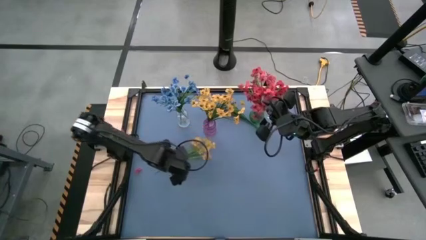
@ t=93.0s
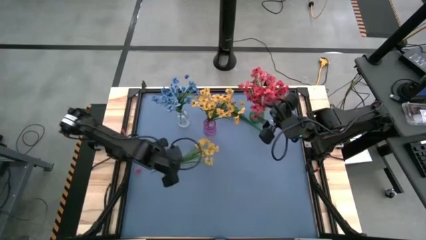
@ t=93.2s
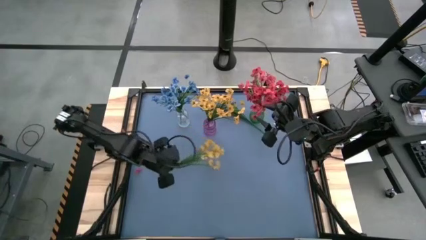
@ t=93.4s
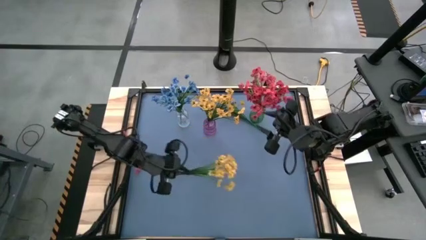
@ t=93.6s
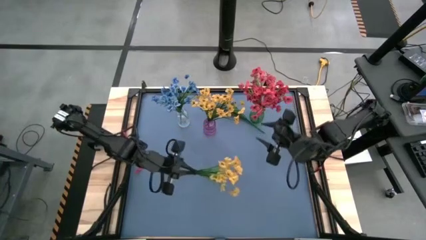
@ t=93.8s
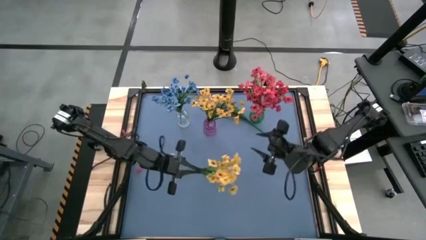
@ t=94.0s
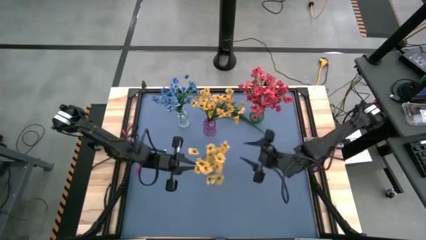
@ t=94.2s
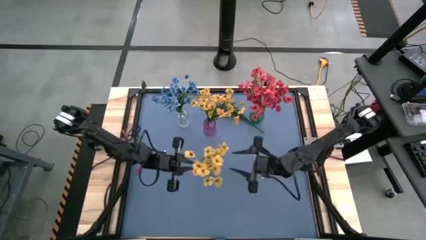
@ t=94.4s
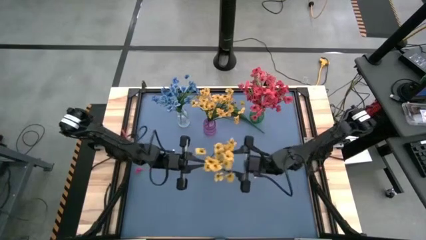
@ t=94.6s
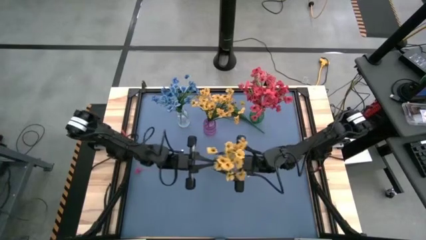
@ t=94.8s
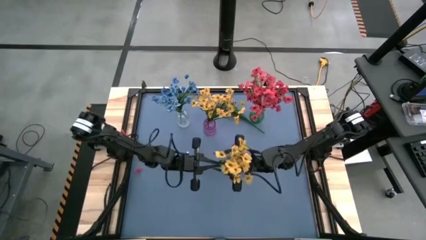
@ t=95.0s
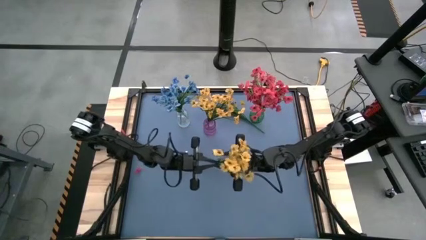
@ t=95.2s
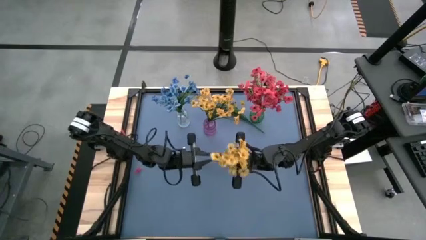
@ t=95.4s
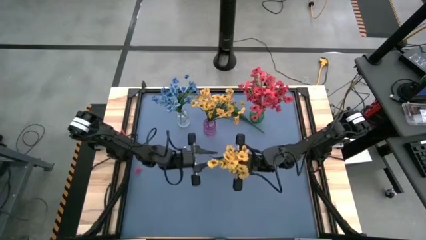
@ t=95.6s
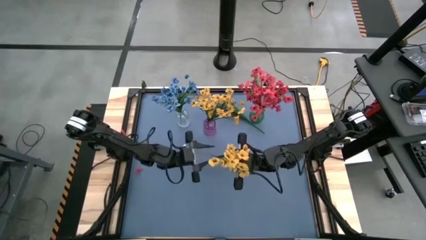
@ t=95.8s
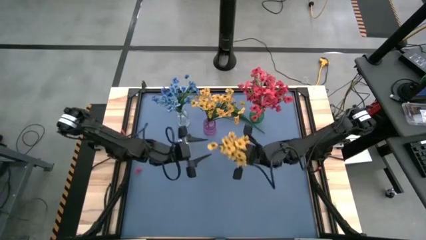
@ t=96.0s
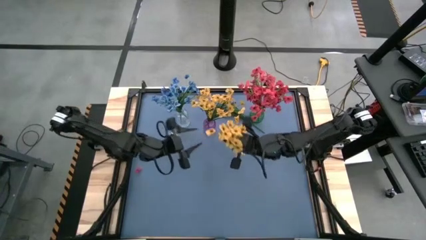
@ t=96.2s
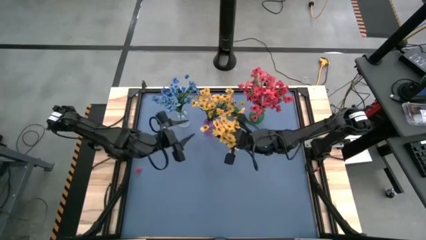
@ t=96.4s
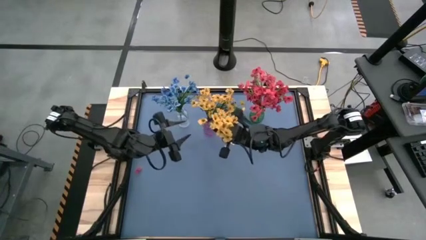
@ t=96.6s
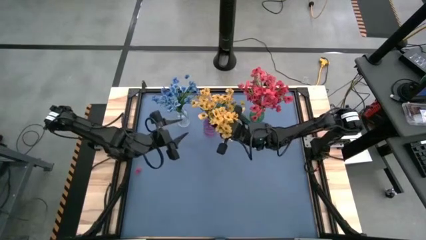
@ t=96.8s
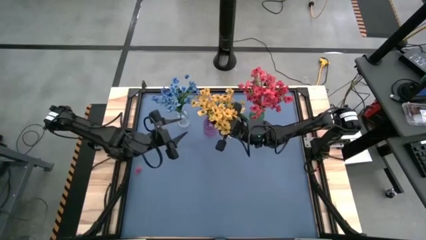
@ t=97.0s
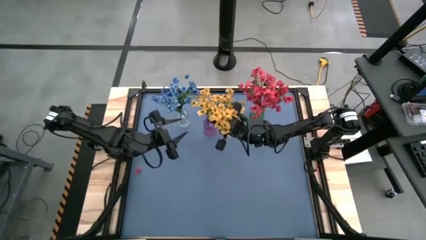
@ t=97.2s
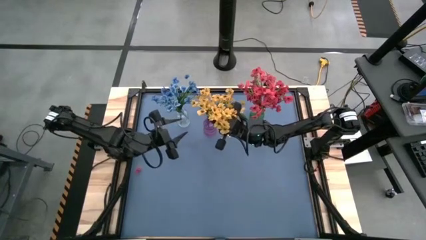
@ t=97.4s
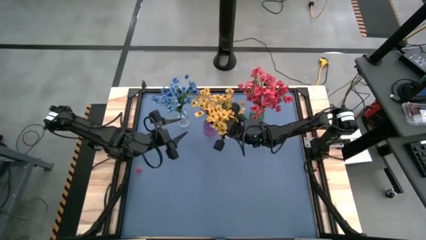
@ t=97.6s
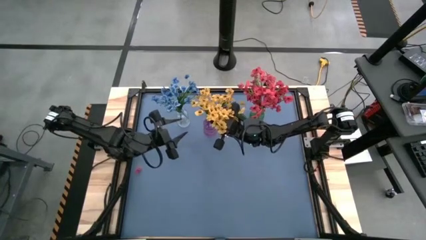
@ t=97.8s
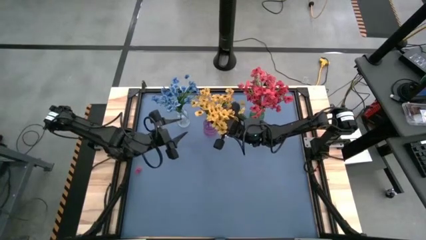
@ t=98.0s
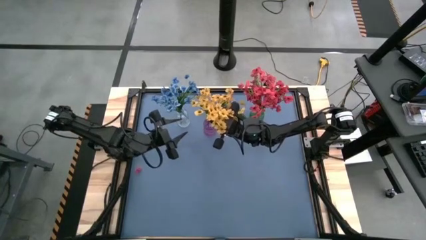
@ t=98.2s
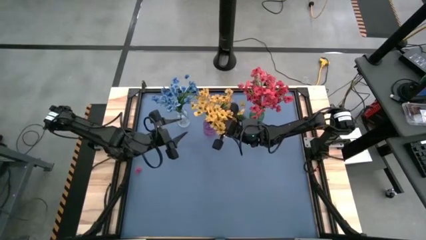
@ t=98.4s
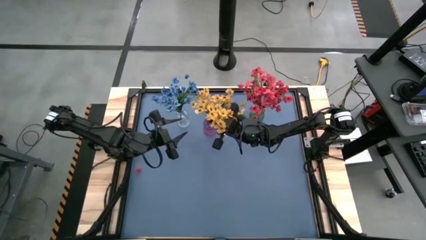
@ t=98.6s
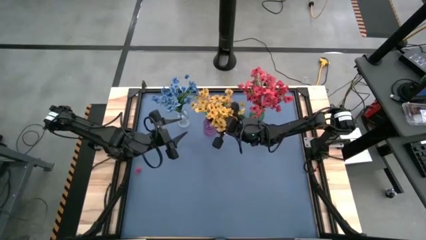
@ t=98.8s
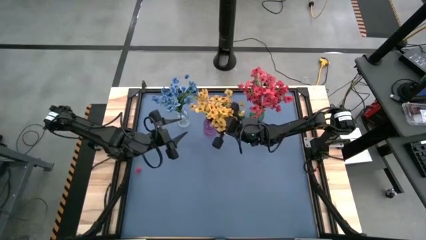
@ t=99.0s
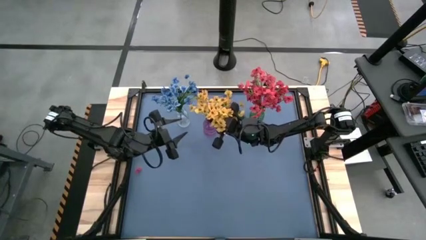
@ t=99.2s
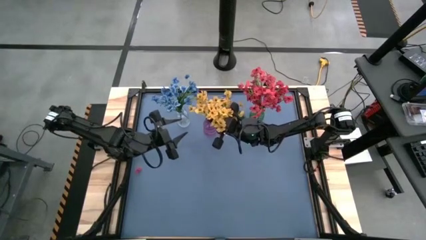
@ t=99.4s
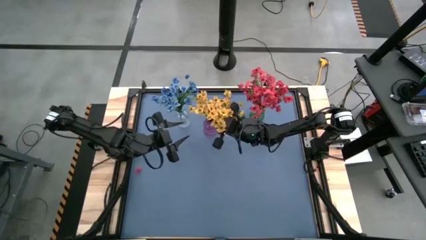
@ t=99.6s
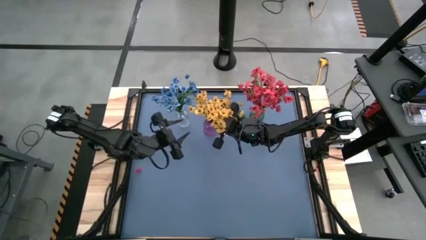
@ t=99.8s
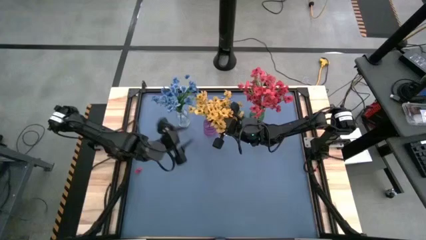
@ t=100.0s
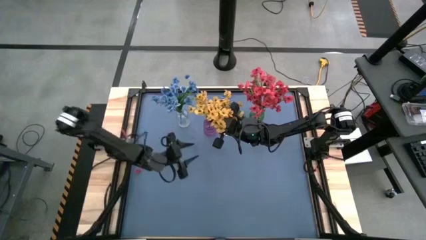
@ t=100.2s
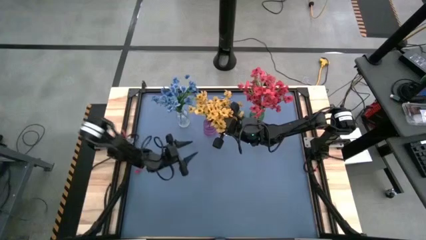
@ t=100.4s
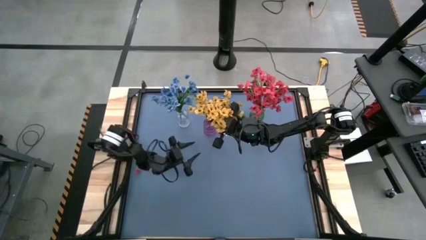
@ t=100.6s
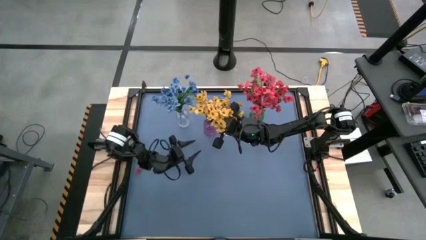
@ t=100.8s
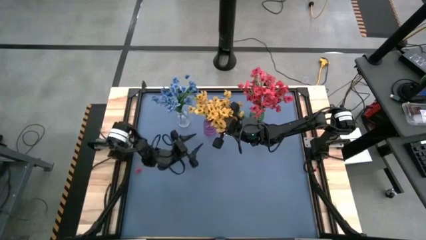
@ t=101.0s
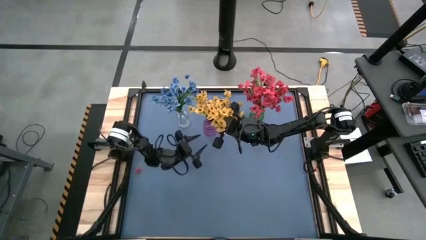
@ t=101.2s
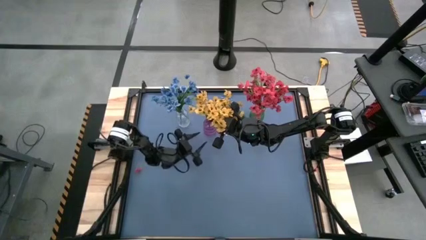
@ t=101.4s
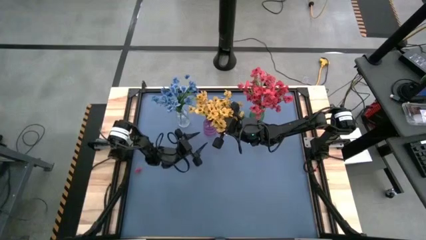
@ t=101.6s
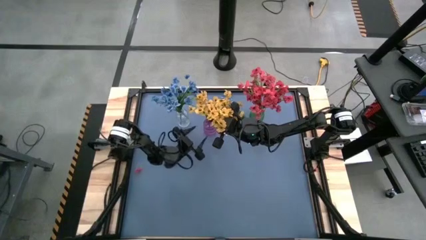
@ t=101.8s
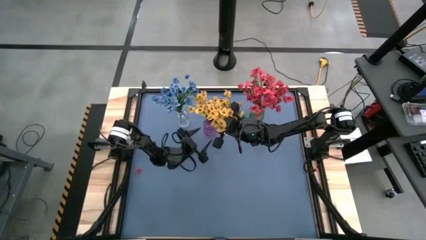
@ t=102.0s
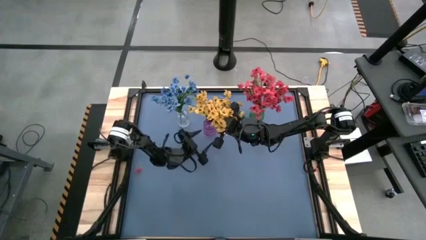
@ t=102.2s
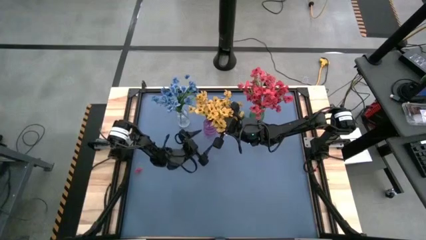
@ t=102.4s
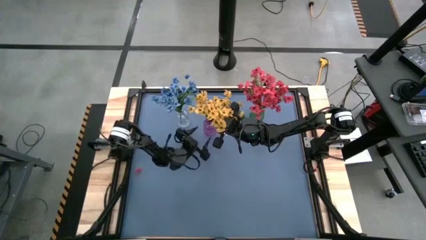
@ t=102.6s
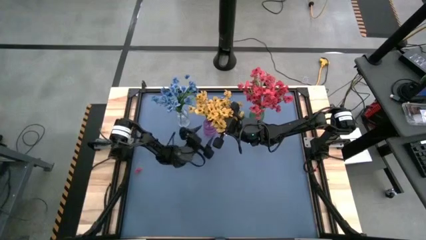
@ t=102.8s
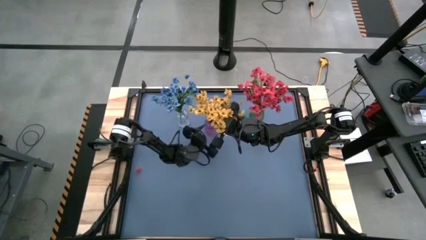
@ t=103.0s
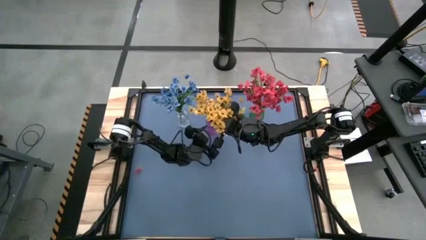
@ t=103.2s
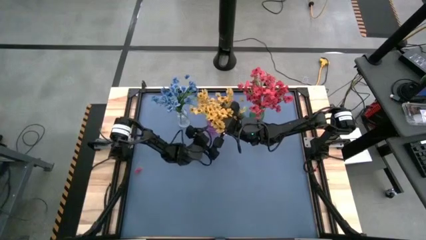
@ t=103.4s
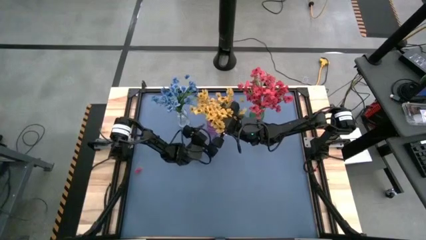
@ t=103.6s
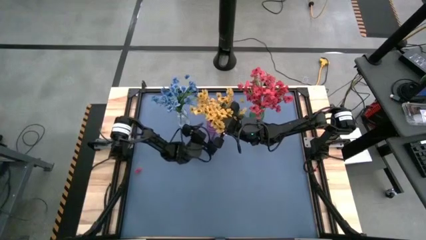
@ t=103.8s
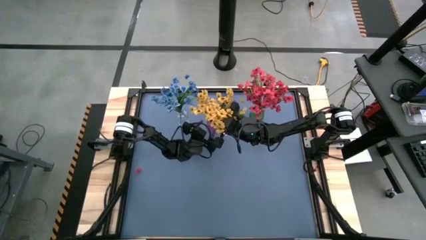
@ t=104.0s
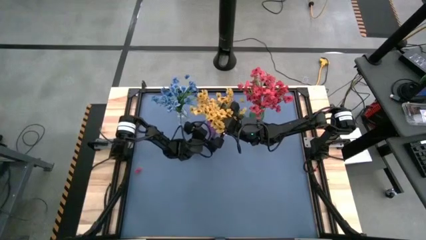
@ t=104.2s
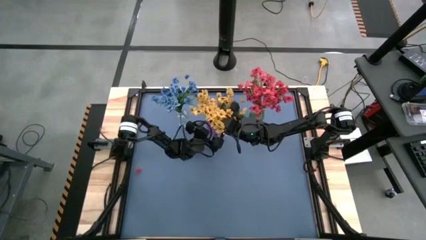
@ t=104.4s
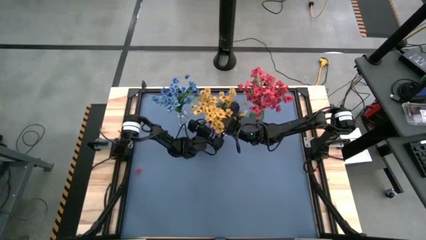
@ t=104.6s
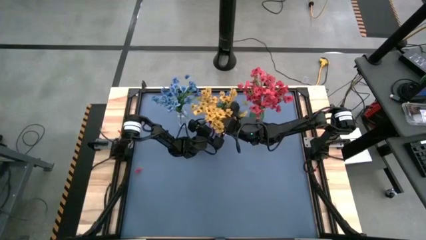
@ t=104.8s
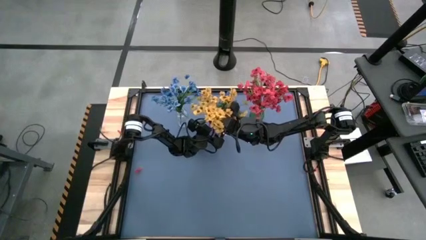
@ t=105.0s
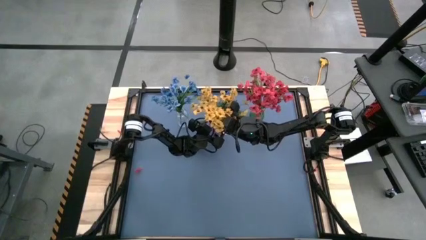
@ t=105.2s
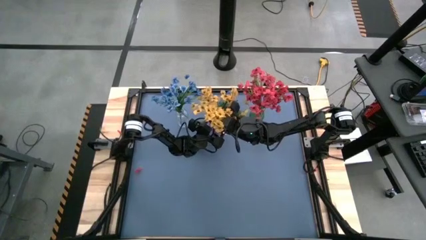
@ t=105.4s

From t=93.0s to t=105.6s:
Task: Sort flowers into vase by color
Put the yellow flowers into the violet vase

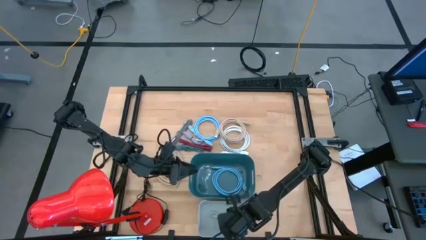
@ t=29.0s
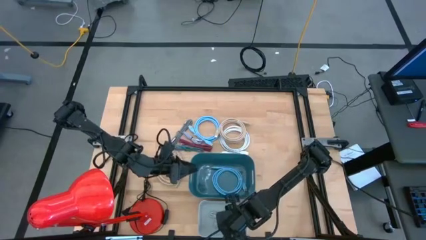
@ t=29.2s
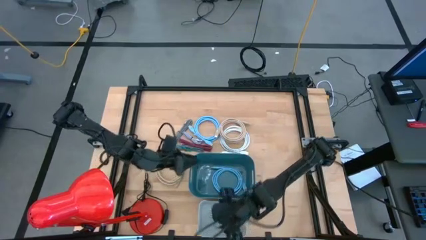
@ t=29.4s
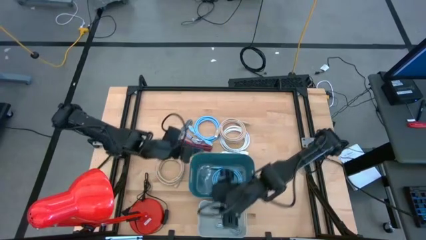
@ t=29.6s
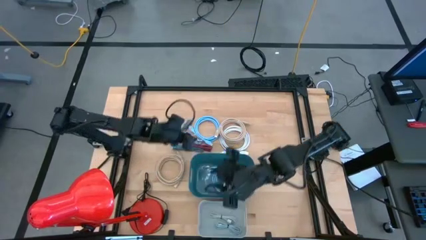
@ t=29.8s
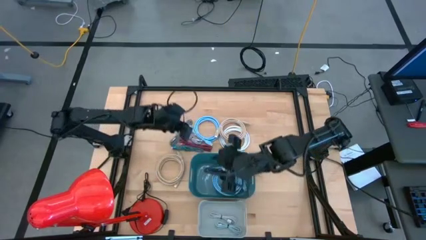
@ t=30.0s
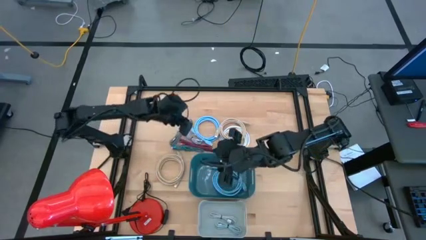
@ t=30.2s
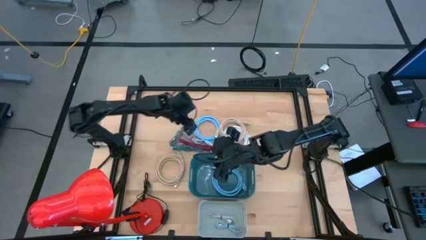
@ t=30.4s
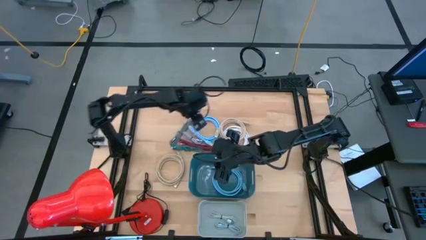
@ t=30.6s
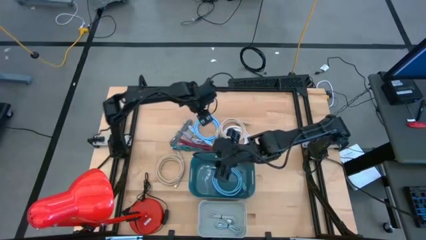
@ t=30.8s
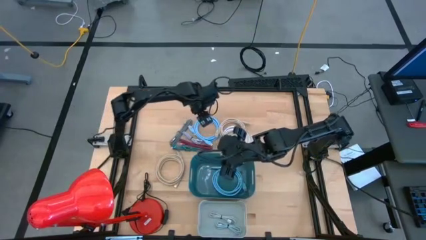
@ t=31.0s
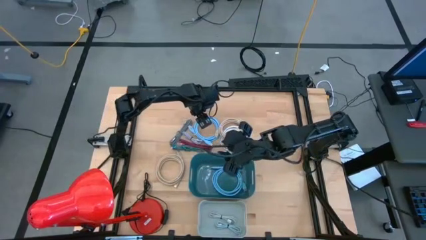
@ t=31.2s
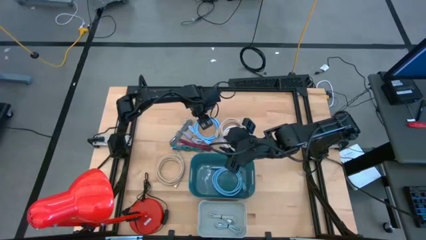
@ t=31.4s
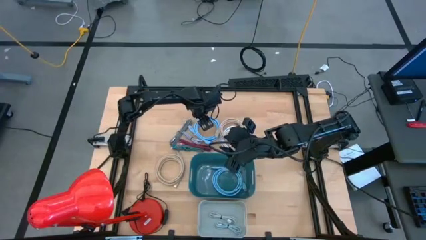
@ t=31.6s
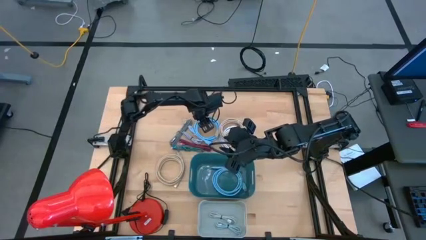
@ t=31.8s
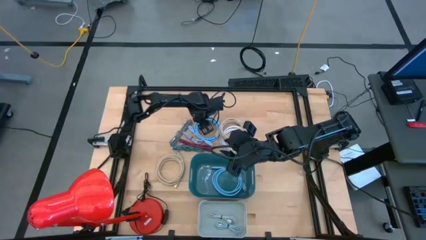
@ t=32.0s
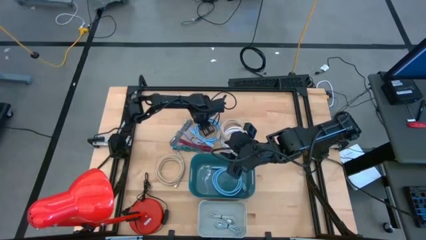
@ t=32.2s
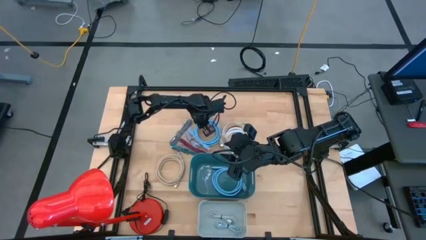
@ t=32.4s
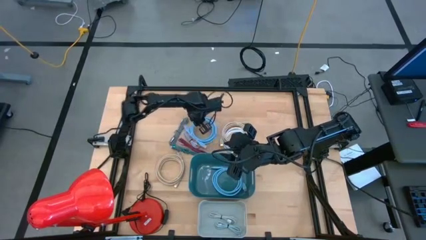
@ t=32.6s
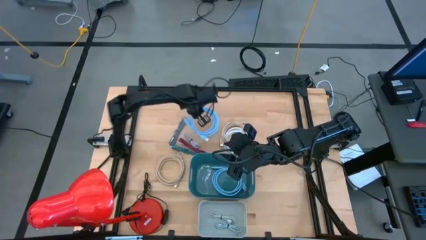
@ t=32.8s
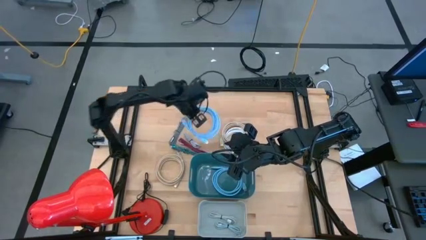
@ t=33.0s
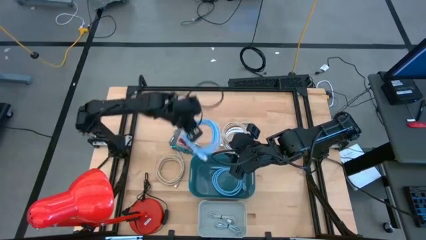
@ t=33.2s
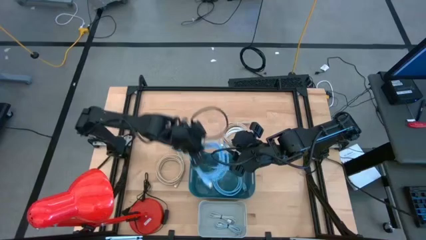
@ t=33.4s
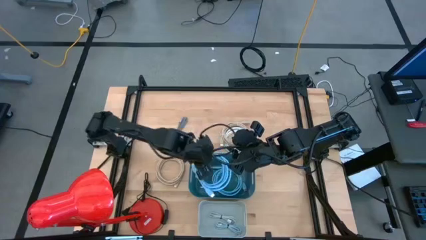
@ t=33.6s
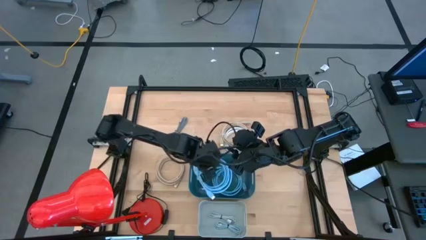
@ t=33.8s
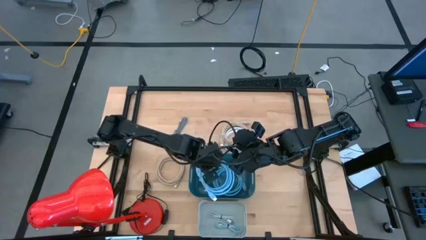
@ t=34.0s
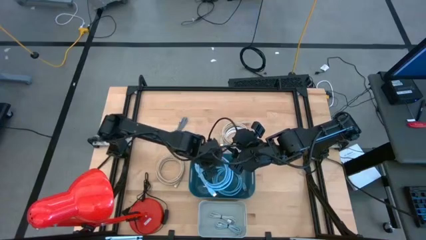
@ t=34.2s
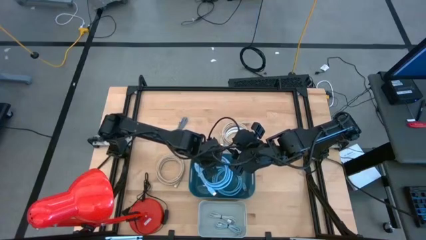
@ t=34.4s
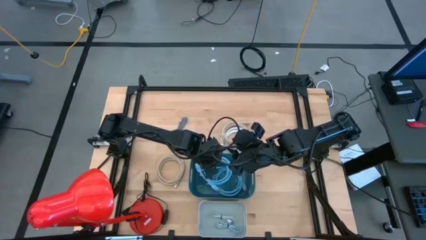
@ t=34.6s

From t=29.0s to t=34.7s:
Task: Pick & Place USB Port
Put the blue HDMI cable into the blue bin
